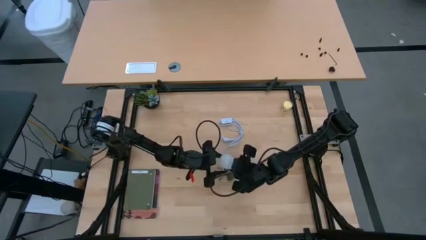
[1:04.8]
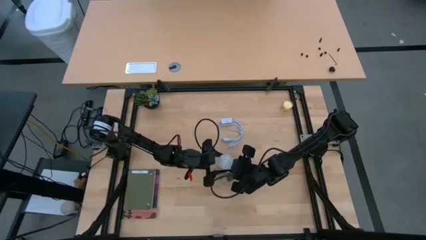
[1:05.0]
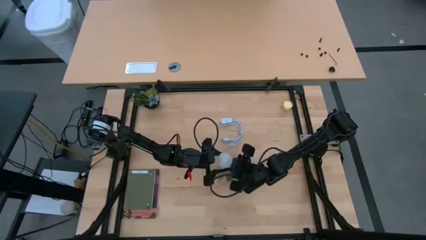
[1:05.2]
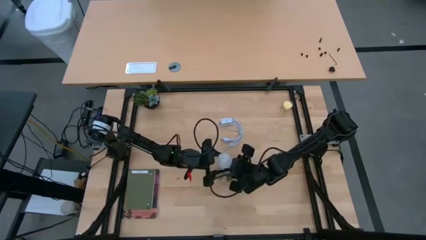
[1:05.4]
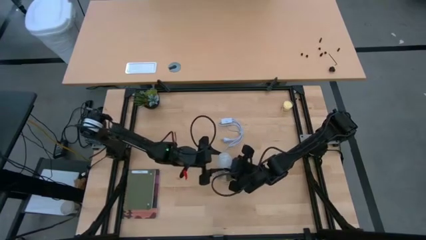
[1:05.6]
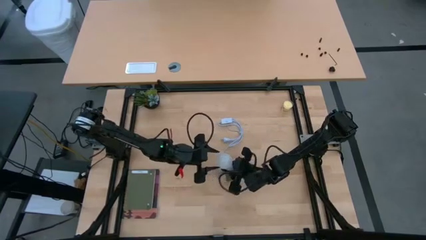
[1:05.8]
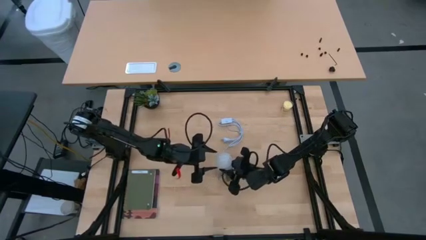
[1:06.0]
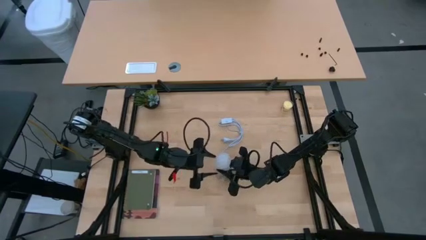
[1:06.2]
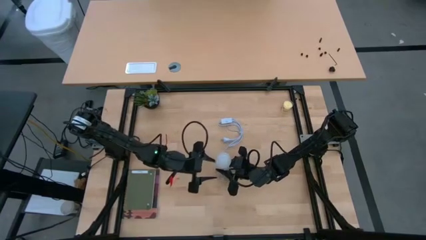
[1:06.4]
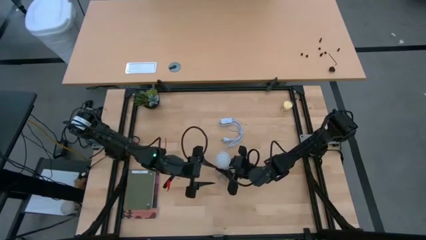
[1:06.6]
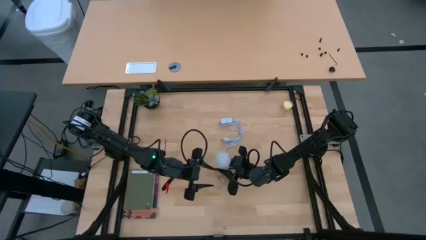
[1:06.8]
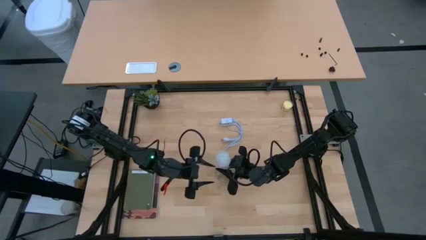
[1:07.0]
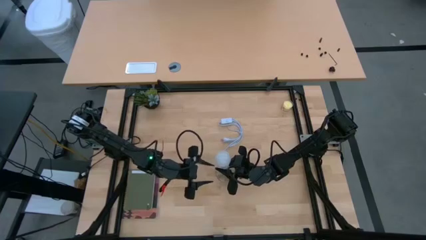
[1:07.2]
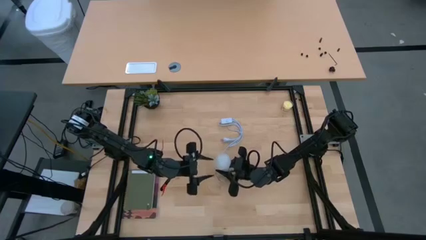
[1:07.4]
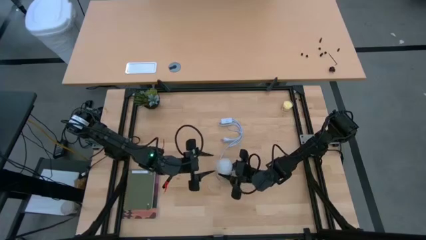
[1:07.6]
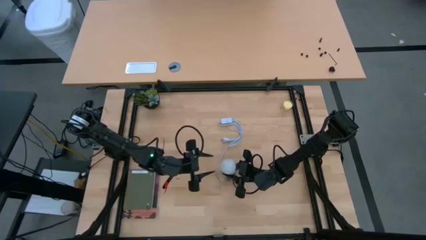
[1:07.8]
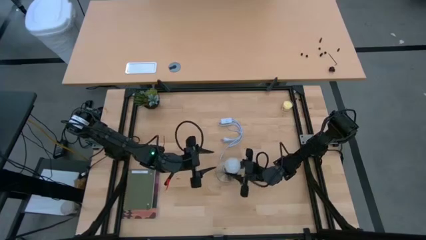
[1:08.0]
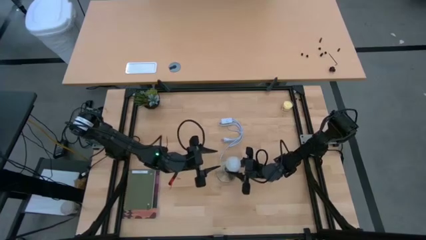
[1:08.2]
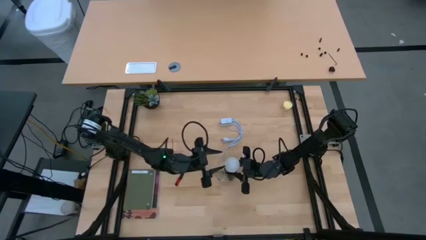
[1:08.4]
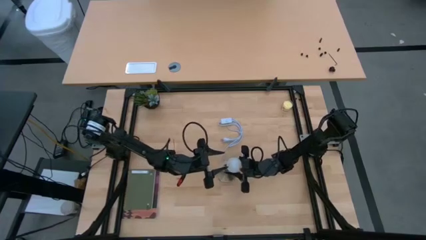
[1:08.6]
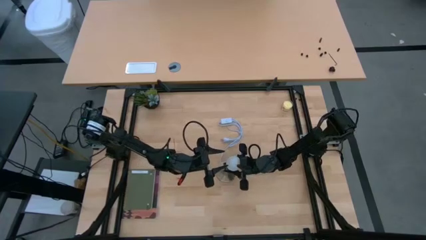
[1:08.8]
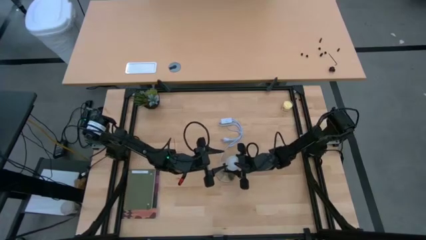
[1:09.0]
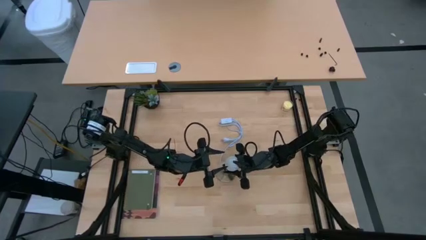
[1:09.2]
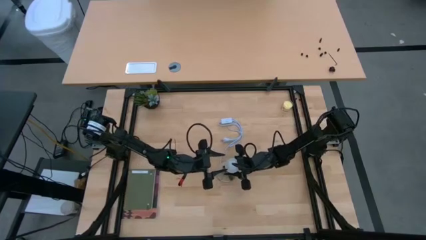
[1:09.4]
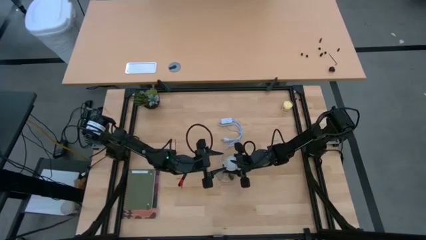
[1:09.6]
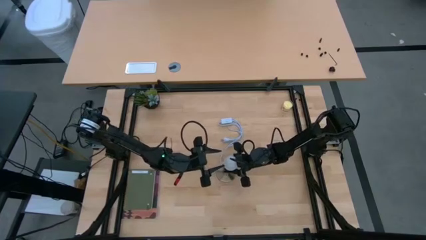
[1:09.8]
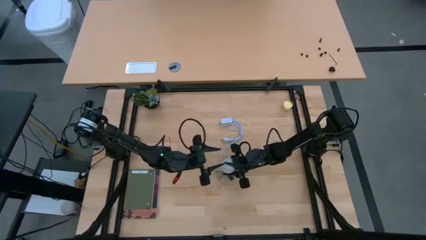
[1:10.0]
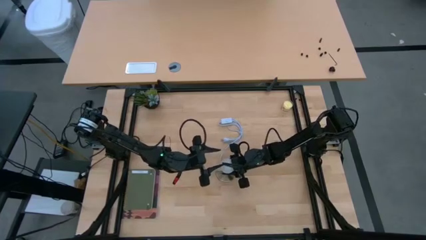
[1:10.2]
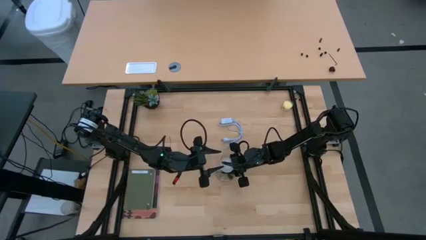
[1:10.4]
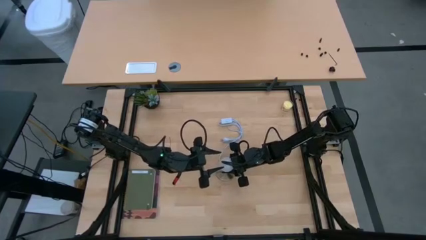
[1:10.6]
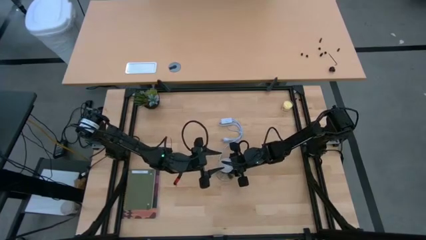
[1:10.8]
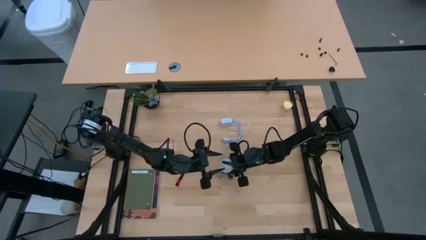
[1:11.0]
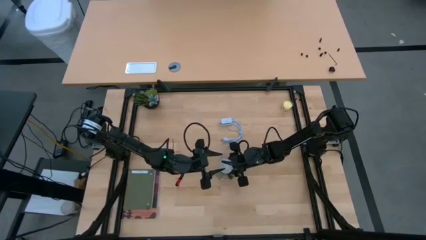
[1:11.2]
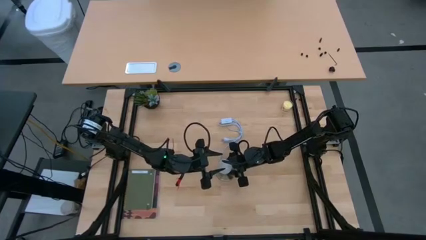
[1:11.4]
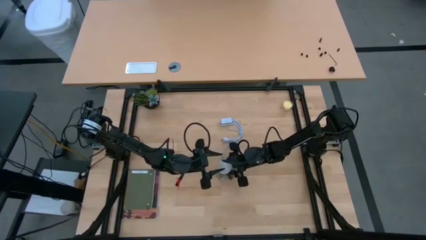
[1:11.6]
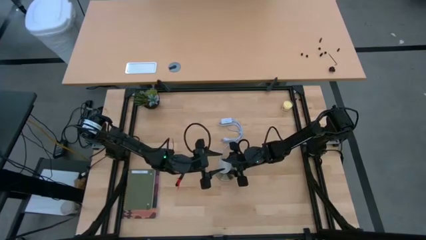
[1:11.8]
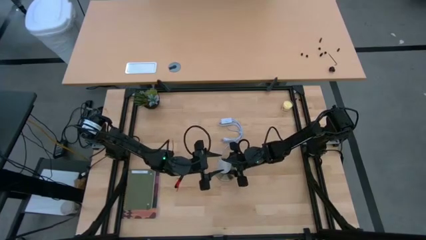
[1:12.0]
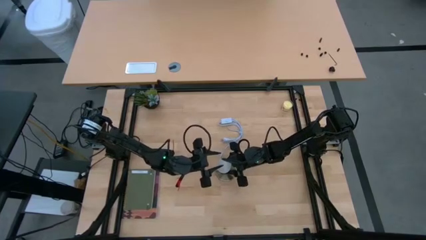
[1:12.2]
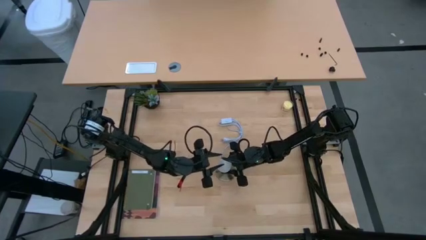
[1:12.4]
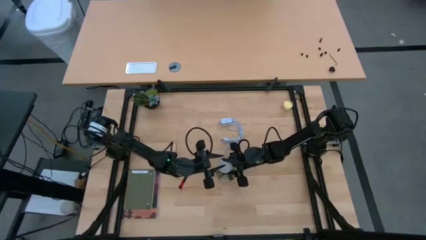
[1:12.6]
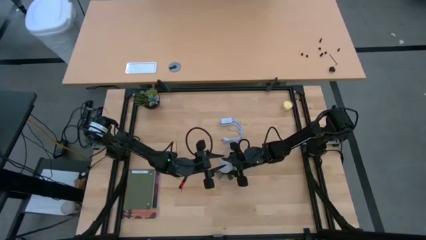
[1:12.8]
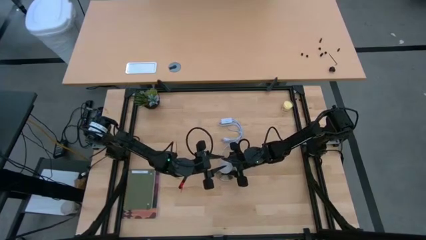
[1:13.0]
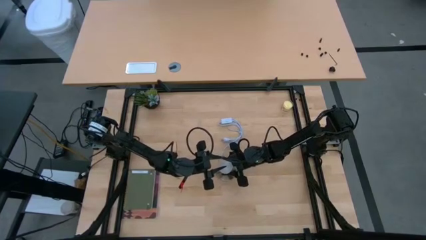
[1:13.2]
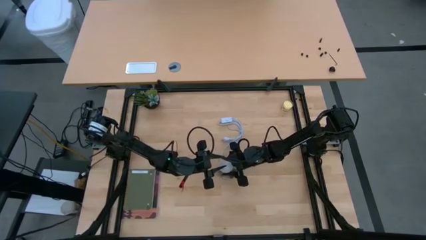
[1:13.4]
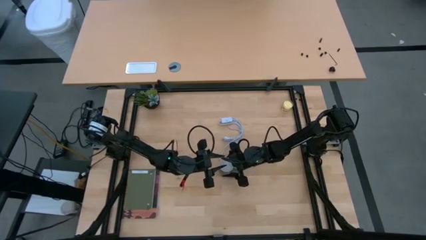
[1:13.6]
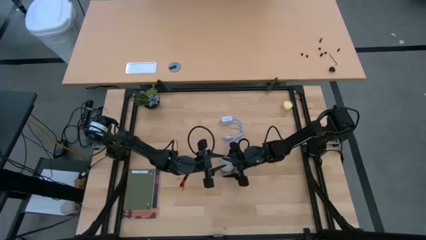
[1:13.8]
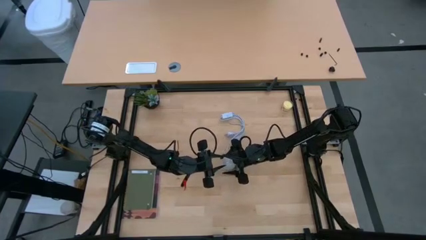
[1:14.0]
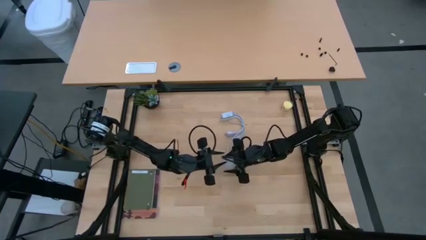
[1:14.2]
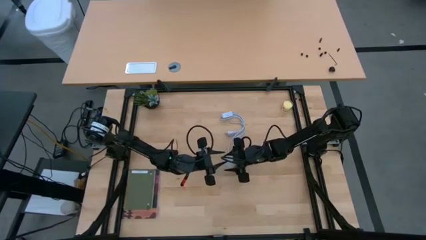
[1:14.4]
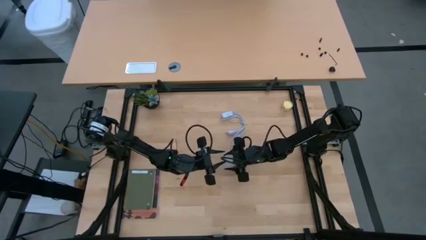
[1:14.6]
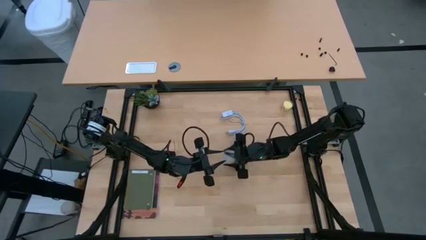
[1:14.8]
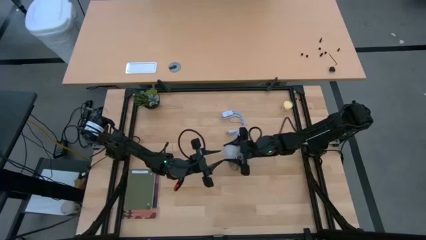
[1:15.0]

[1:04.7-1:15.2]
Task: Screw lightbulb
Insert the lightbulb into the lamp

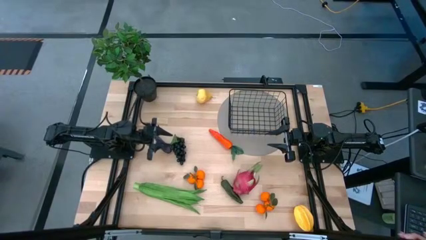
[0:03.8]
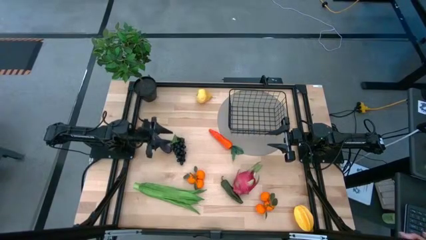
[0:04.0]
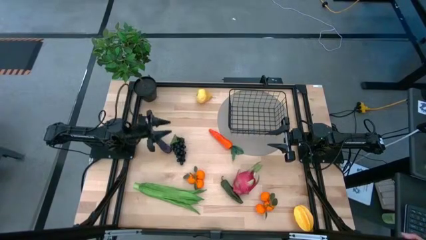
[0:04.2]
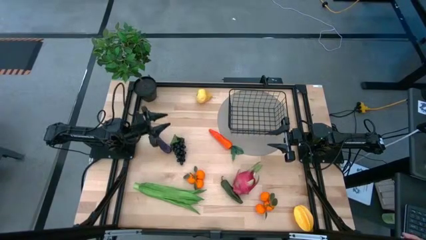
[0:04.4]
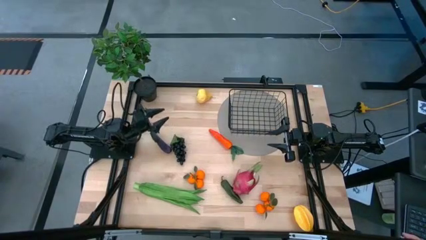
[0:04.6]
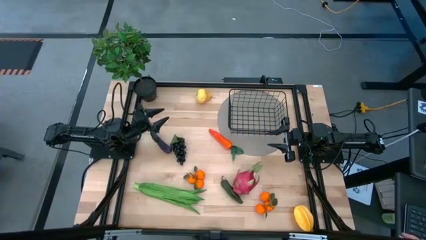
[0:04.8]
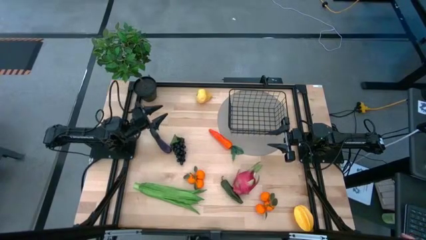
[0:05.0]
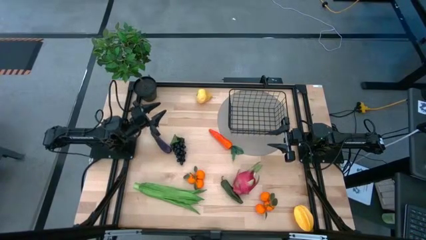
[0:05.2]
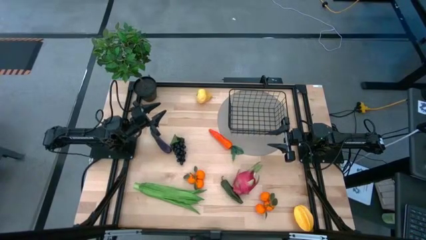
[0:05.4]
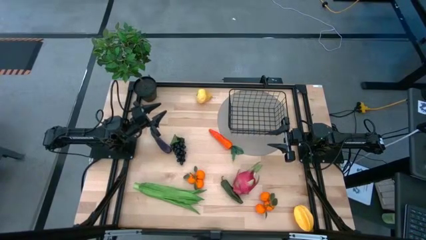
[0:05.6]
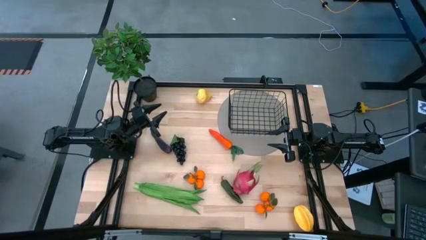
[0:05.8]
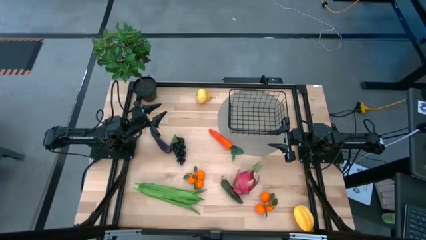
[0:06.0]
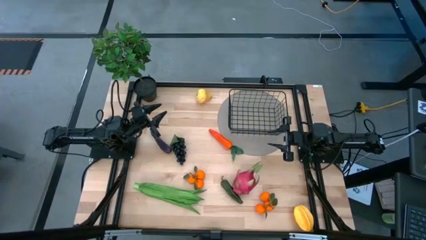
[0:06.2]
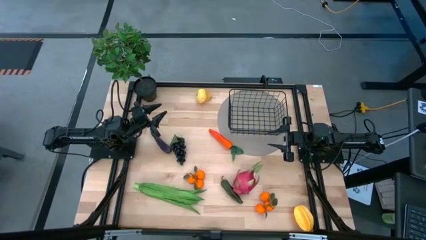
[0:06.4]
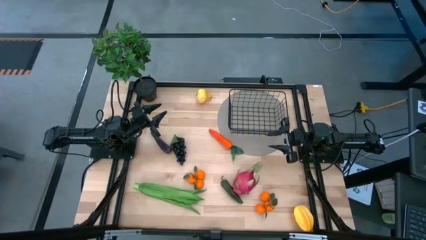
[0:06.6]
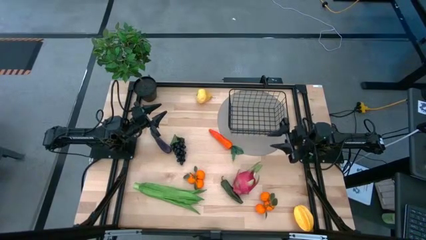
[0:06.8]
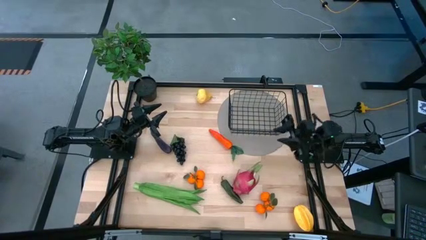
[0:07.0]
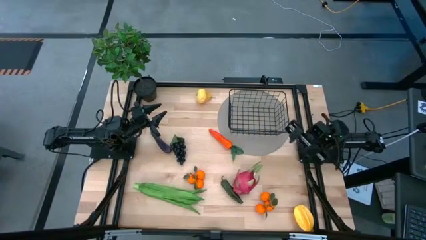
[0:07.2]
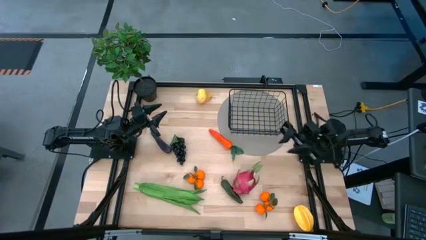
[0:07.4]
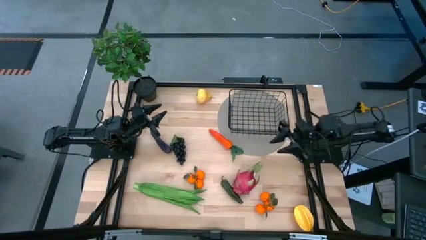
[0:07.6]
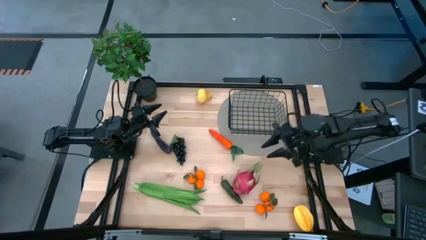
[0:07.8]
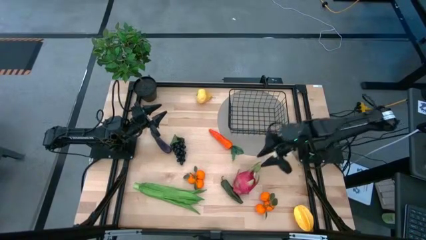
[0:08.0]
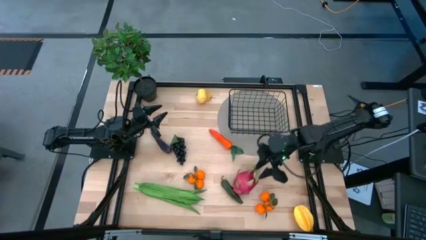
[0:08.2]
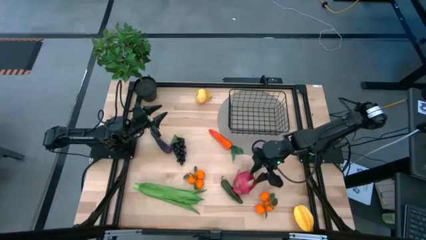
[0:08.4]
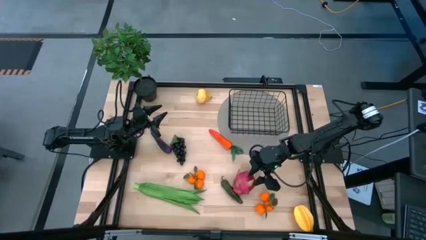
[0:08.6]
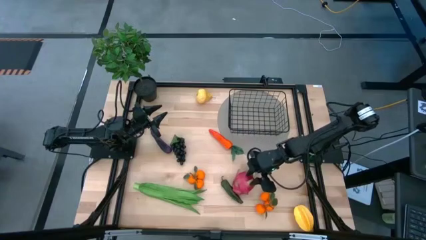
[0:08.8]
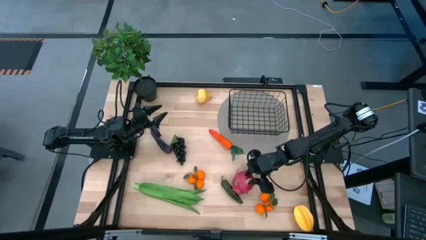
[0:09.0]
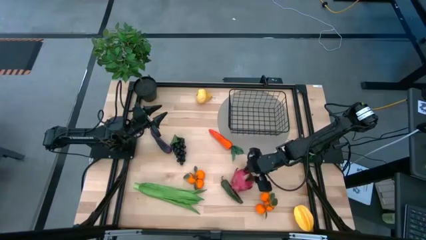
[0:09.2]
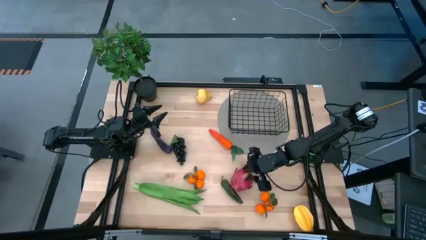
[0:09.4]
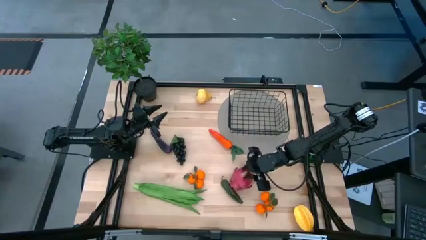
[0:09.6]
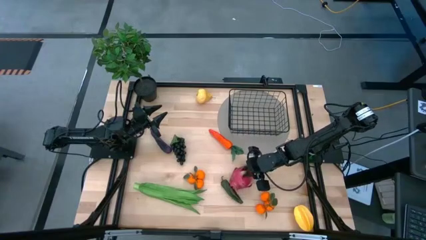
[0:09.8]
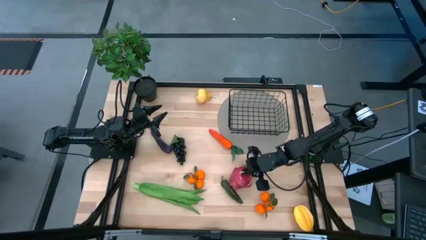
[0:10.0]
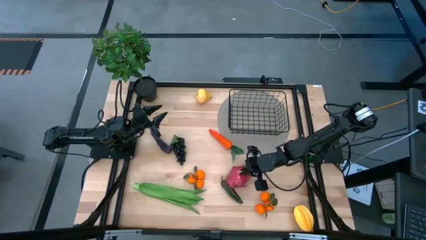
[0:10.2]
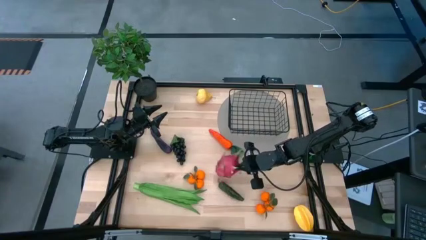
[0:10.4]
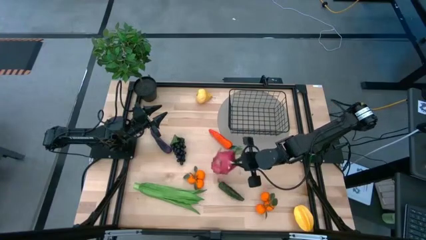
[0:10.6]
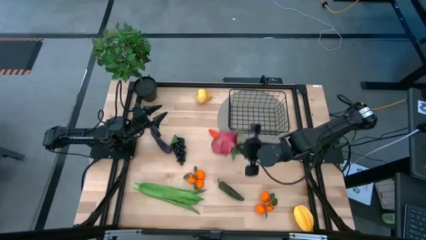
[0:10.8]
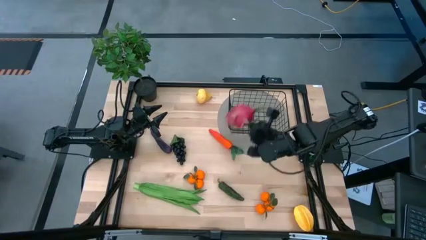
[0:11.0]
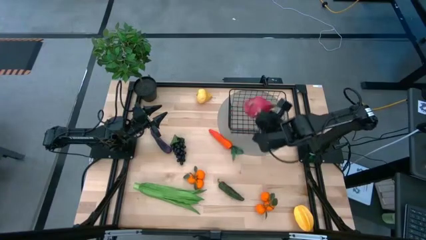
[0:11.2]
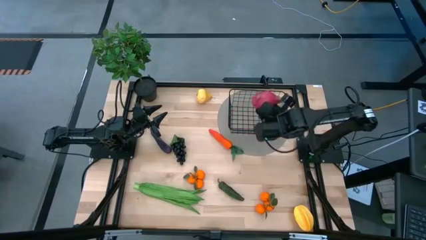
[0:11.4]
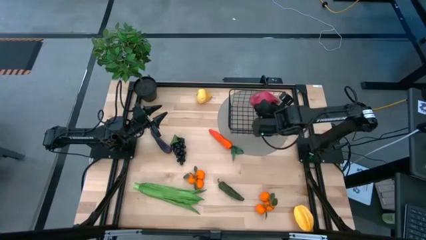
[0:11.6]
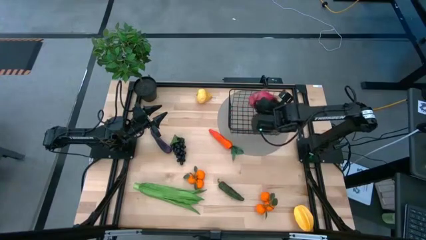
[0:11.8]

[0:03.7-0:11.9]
Task: Build produce basket
Put the dragon fruit into the wire basket
